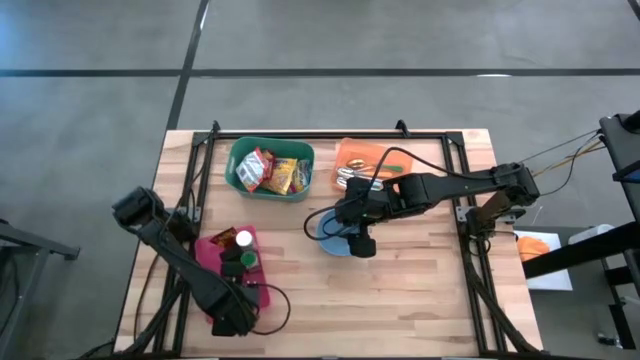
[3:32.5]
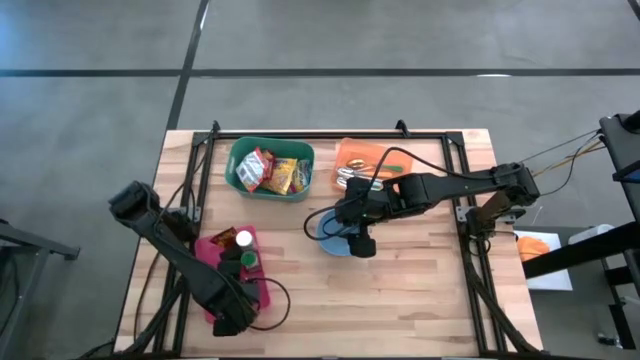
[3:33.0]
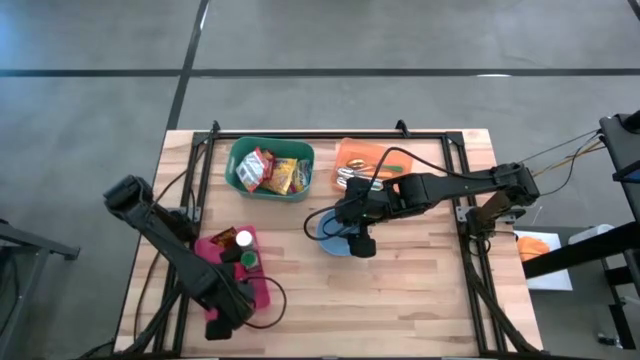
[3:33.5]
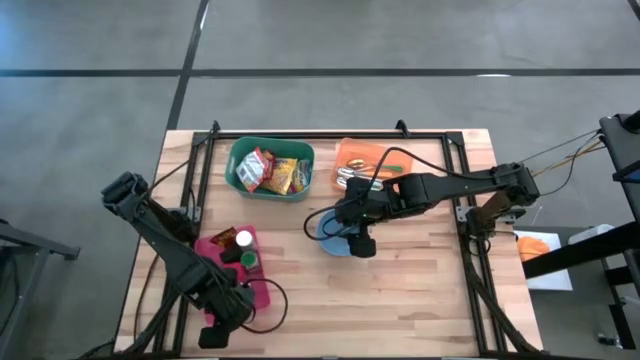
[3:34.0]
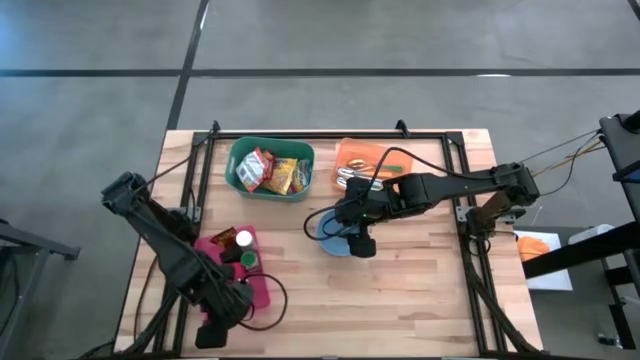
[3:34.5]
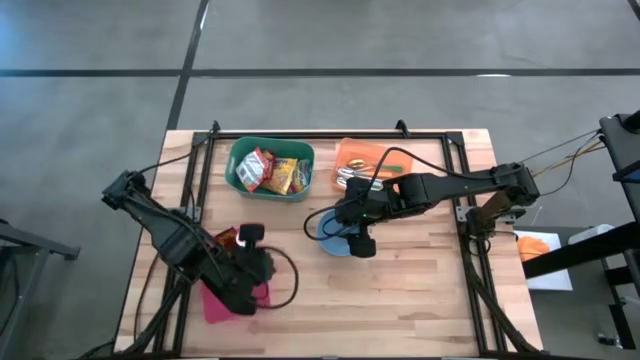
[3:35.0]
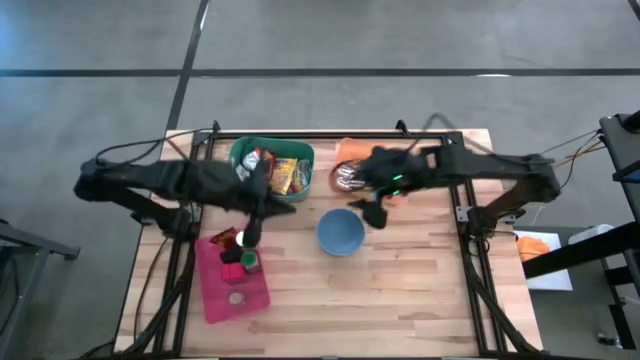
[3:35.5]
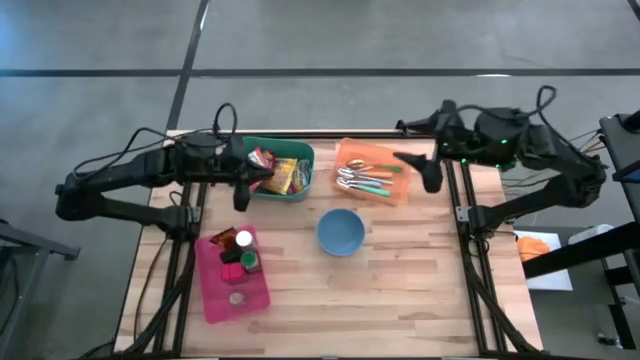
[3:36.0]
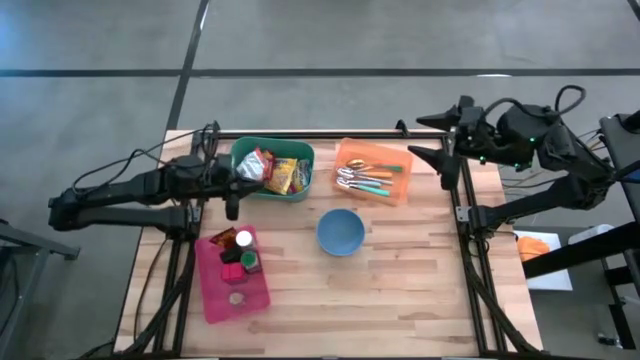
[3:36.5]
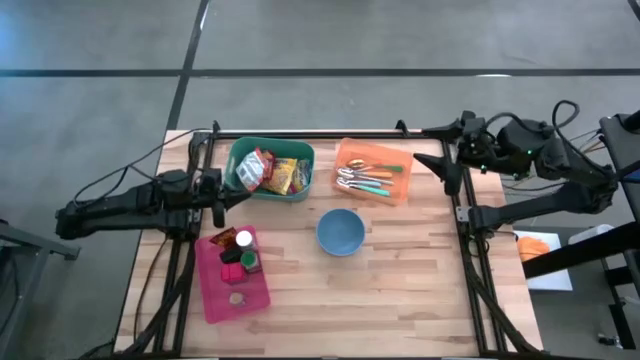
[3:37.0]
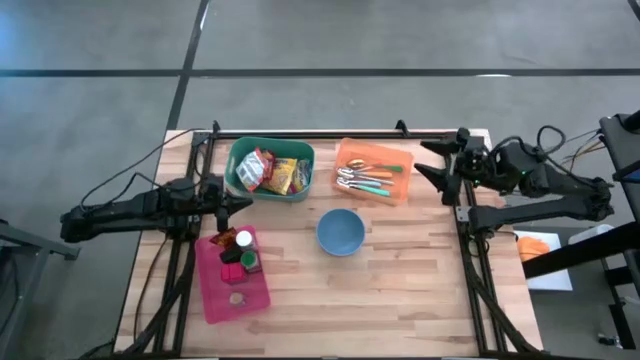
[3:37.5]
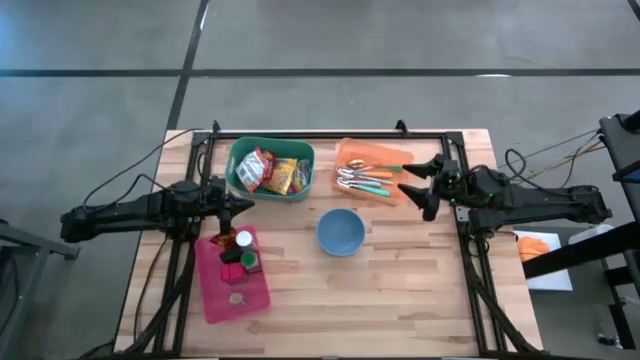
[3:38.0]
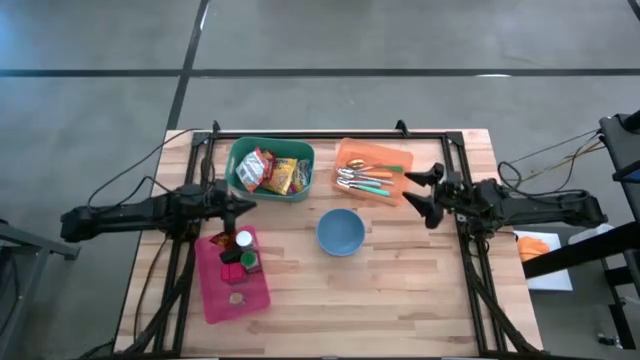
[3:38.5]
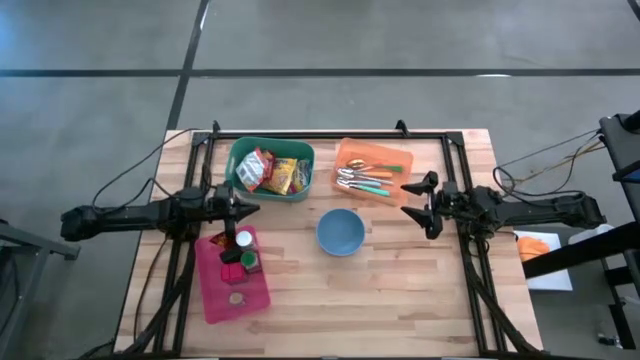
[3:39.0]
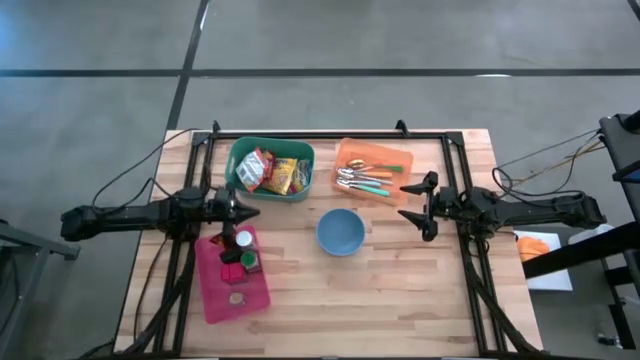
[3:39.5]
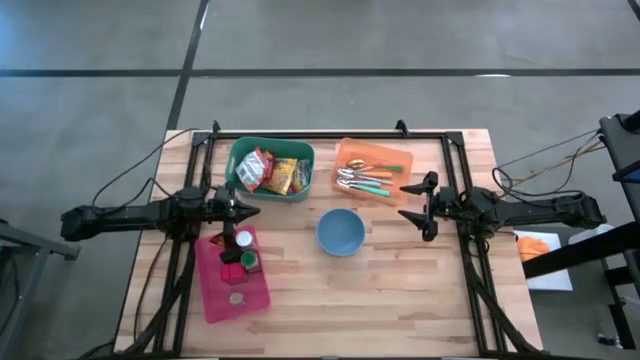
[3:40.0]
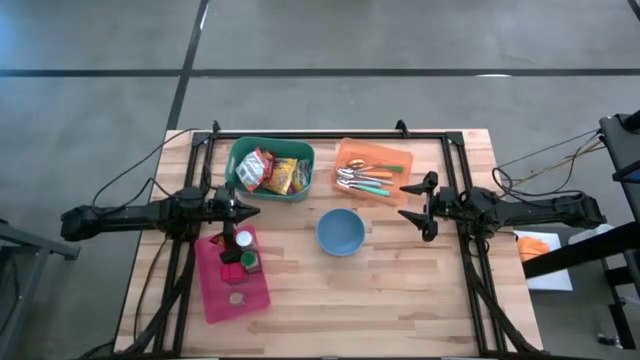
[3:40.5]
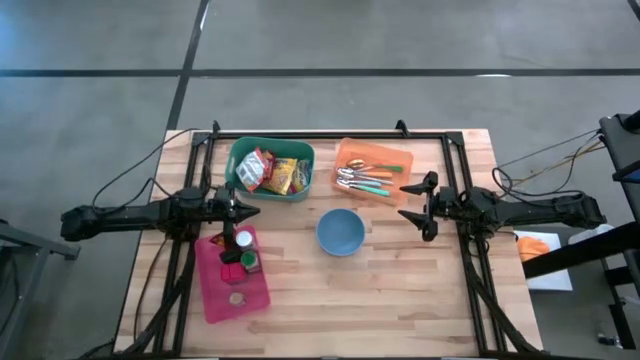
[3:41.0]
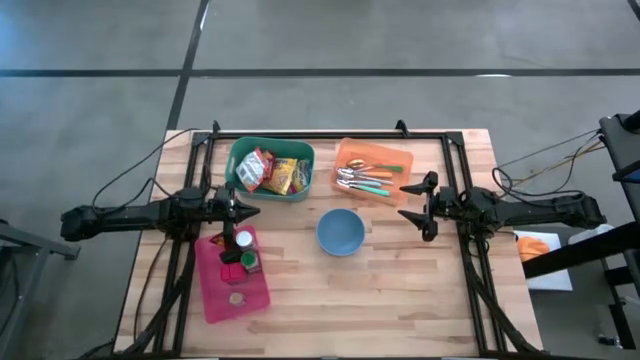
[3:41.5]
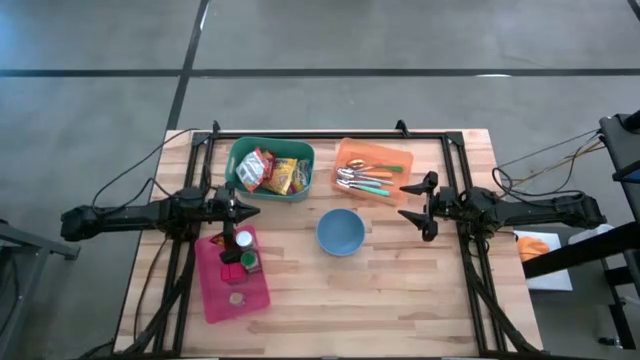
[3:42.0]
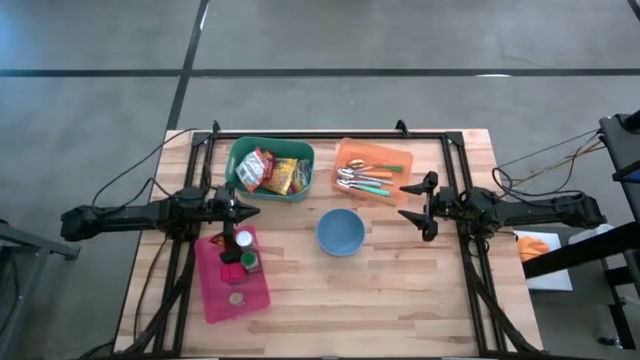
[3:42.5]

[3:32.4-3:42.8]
Return to Home Position

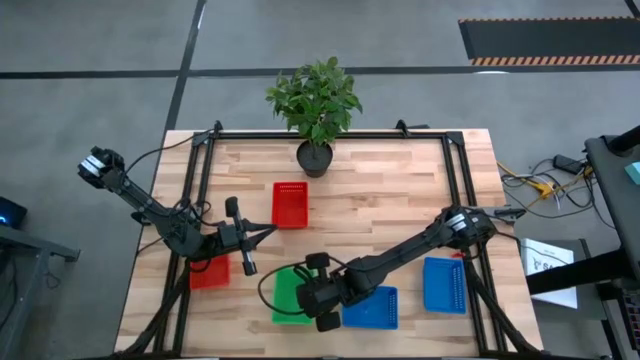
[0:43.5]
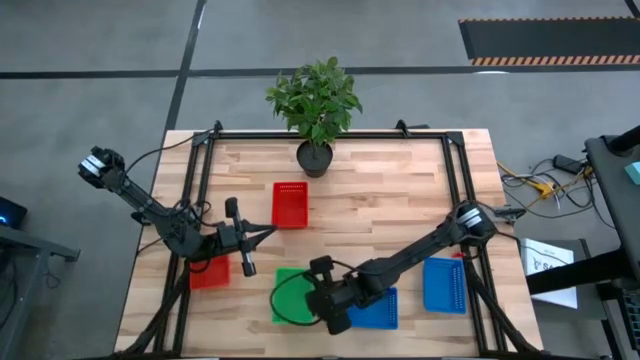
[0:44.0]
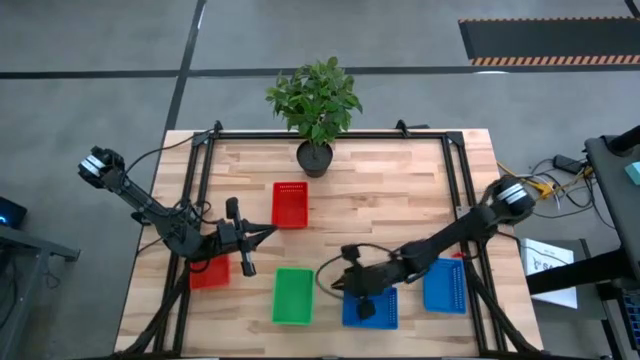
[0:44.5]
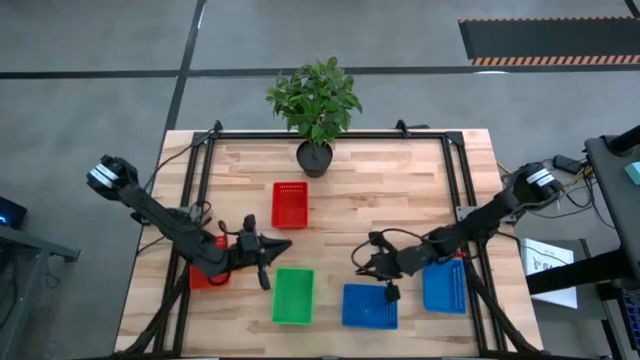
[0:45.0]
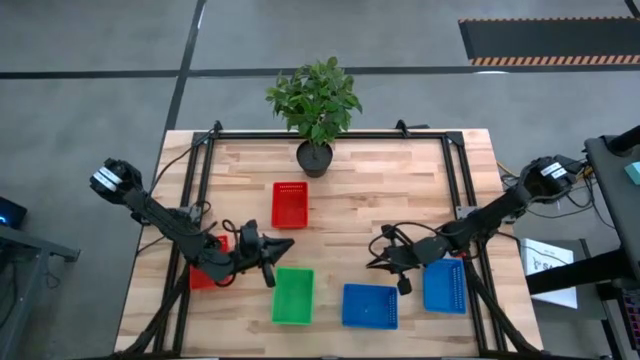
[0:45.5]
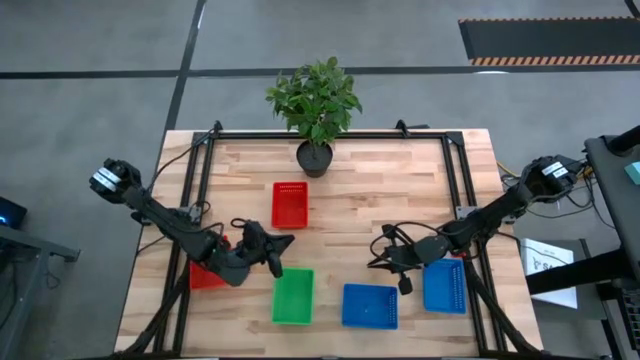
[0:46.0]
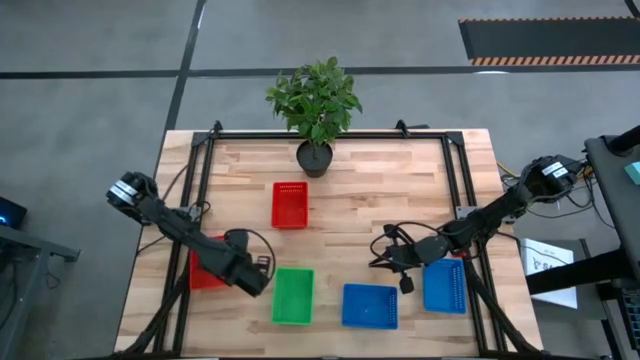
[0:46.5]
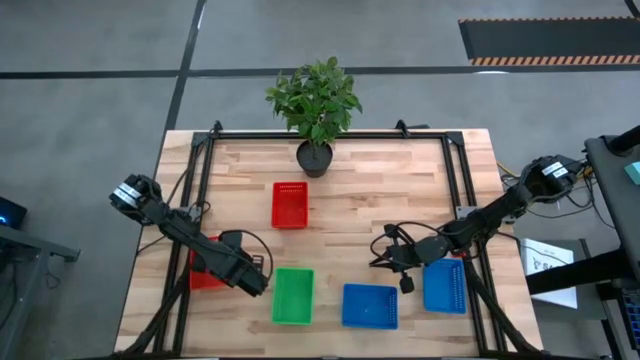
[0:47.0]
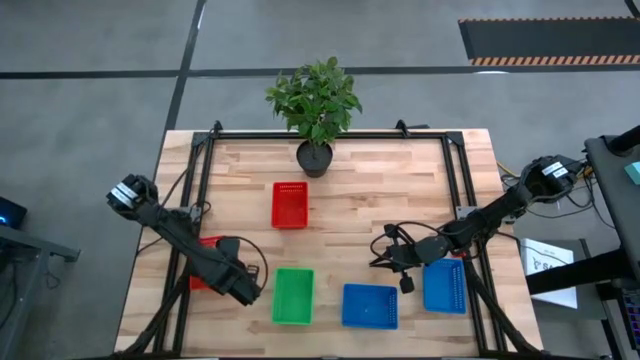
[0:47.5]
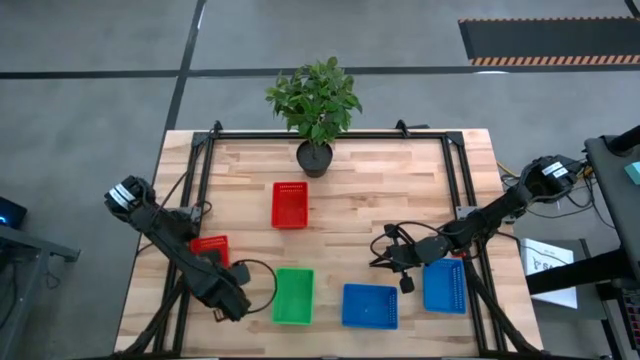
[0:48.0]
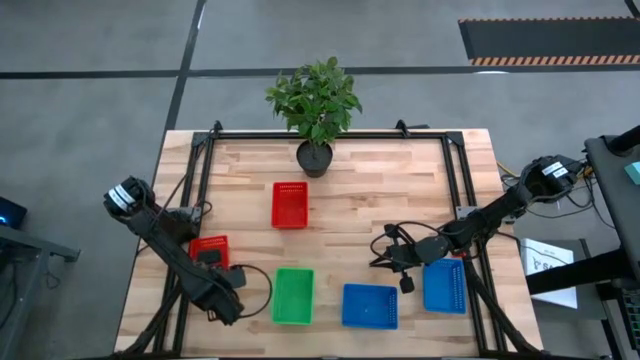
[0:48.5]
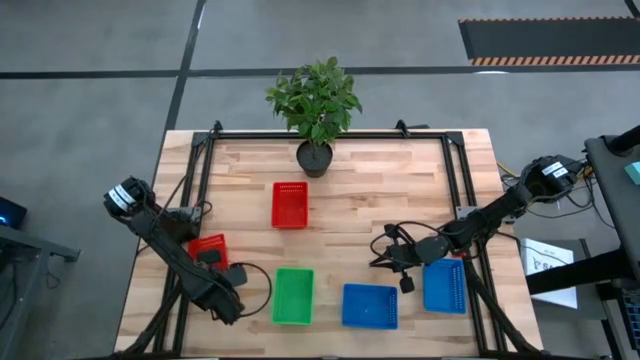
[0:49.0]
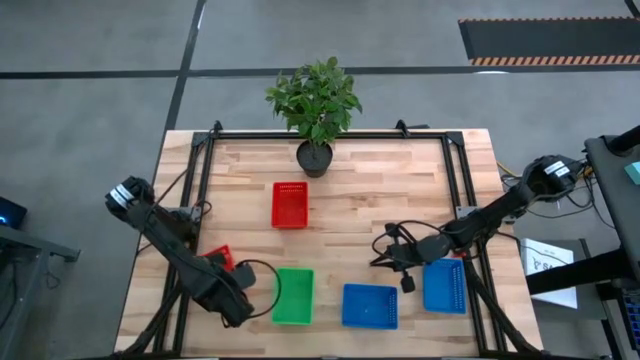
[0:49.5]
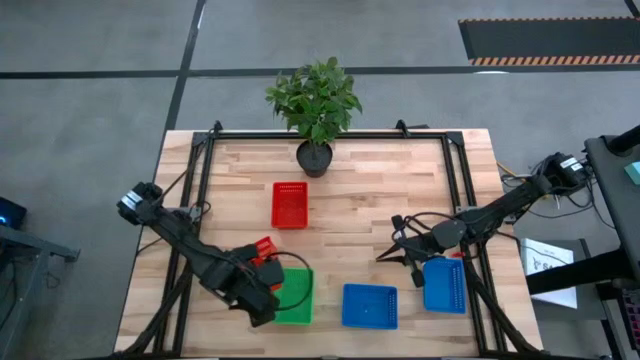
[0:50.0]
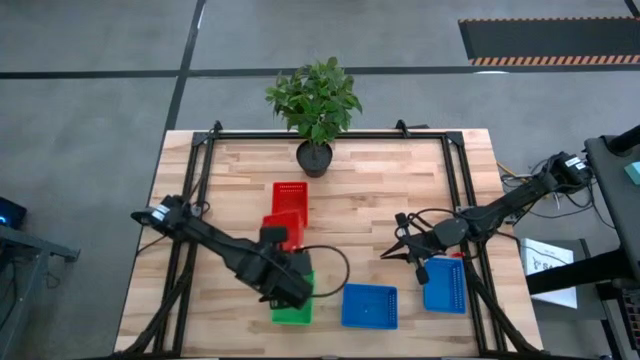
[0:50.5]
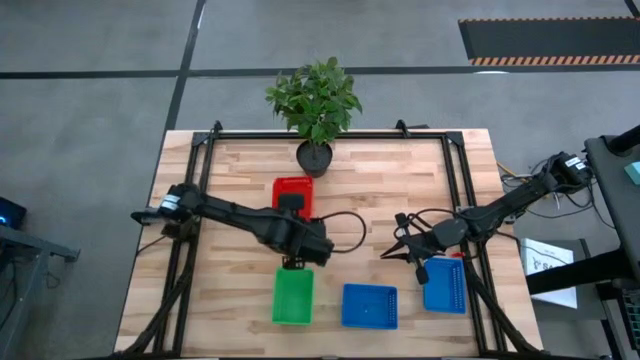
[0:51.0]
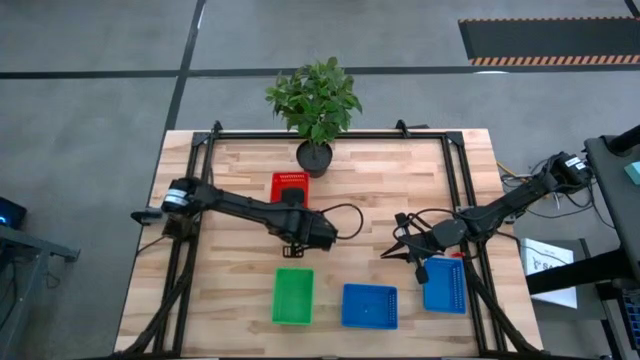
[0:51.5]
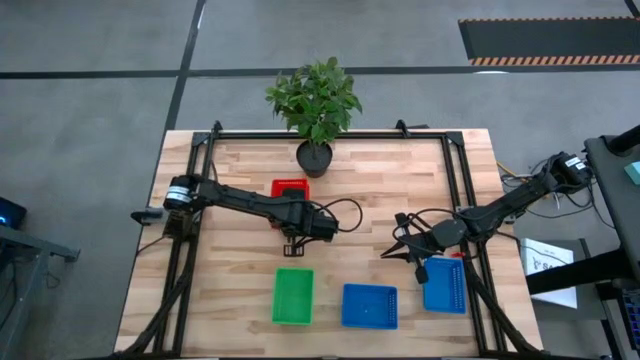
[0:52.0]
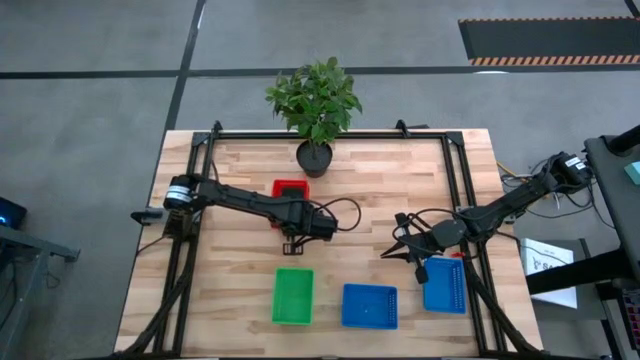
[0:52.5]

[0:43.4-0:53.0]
Stack the bottom red basket on top of the top red baskets

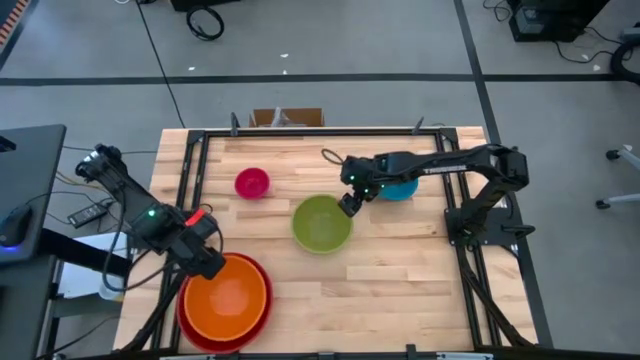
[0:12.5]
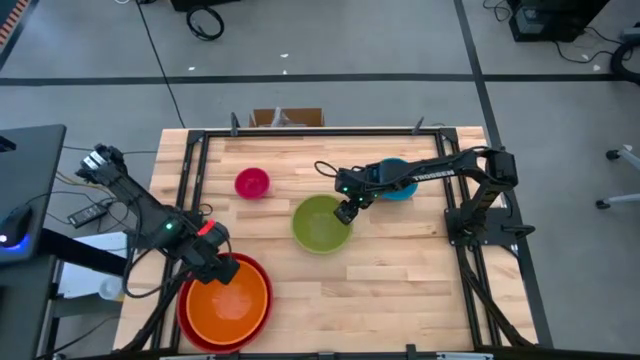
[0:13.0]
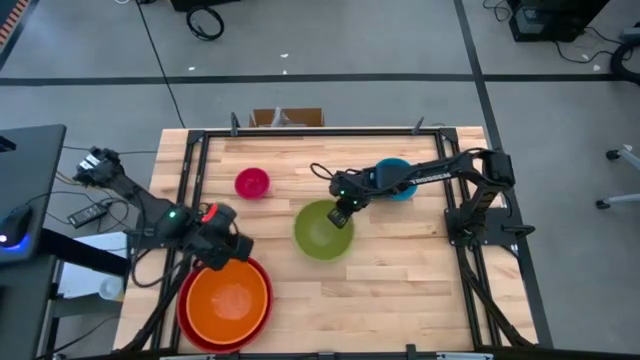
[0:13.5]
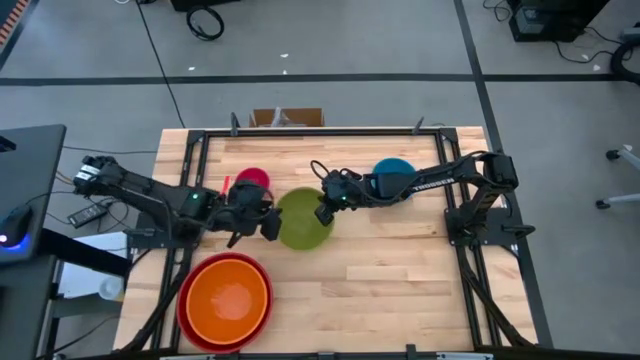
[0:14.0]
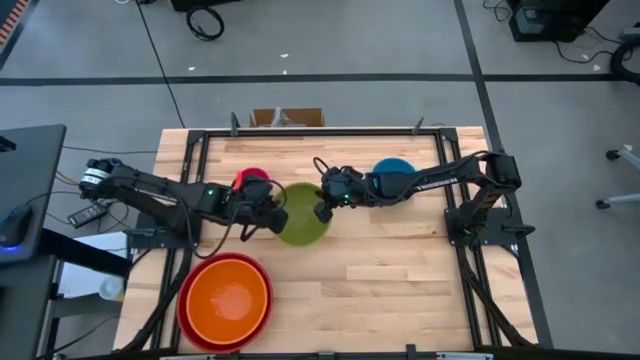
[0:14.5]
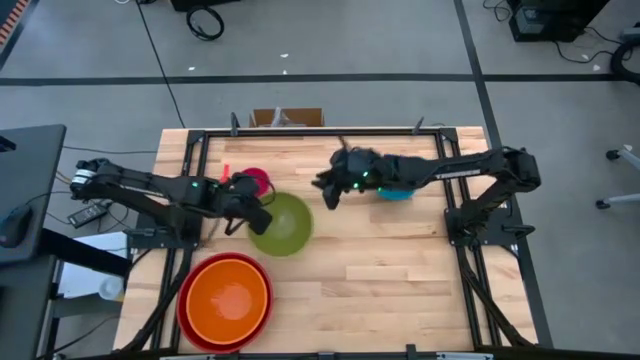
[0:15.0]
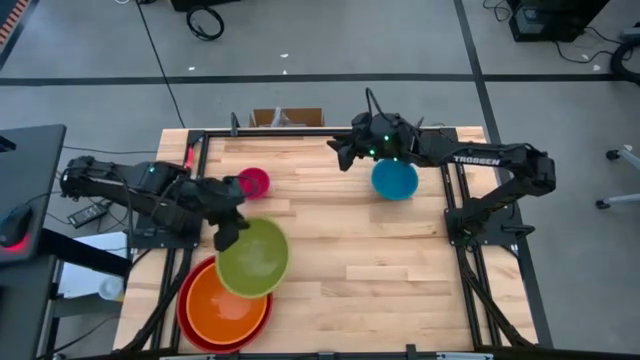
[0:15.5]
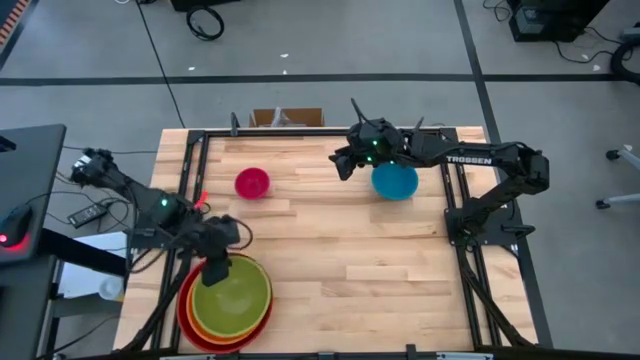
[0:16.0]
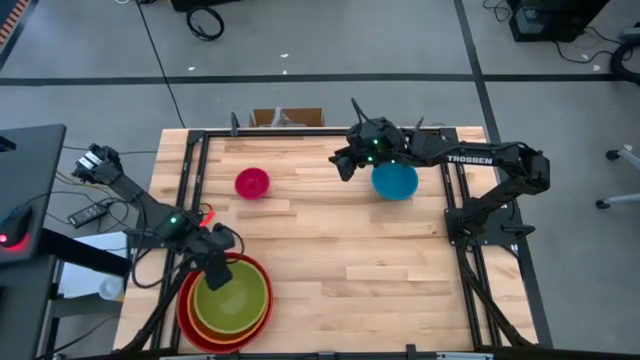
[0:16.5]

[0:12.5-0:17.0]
Stack the green bowl on top of the orange bowl
